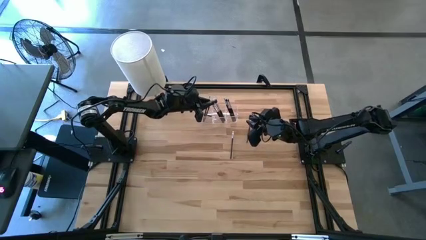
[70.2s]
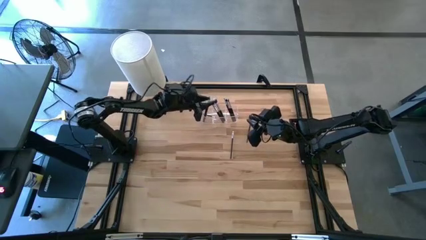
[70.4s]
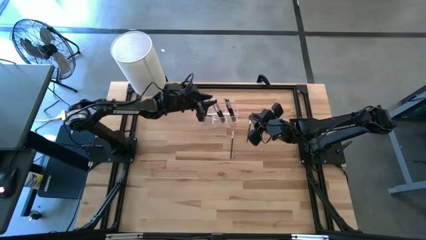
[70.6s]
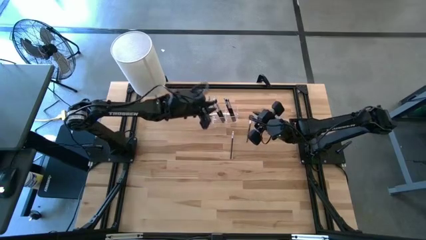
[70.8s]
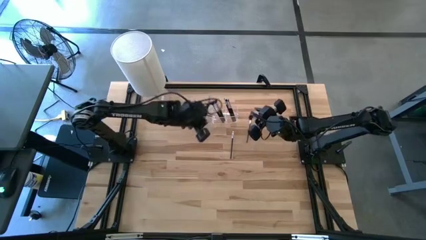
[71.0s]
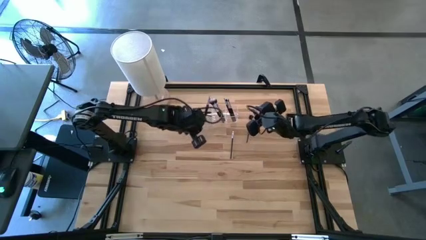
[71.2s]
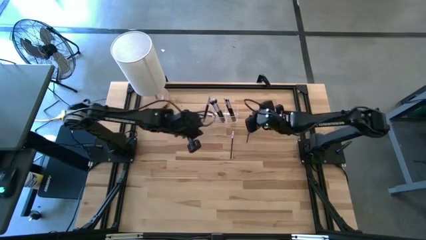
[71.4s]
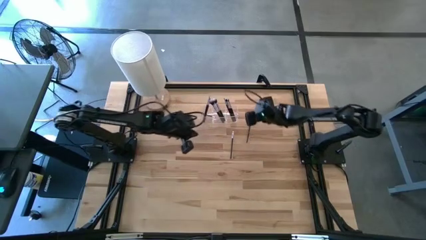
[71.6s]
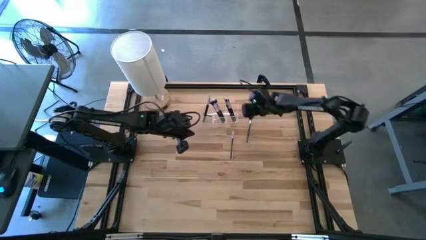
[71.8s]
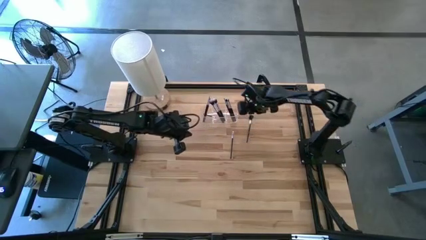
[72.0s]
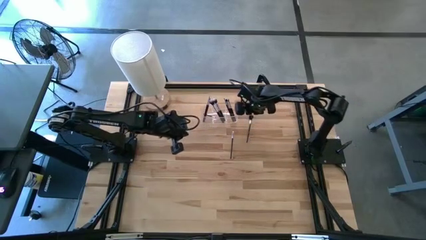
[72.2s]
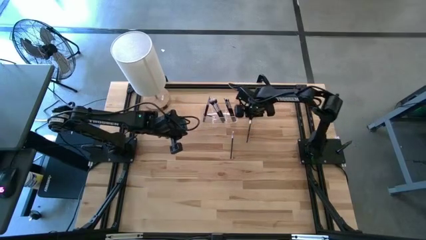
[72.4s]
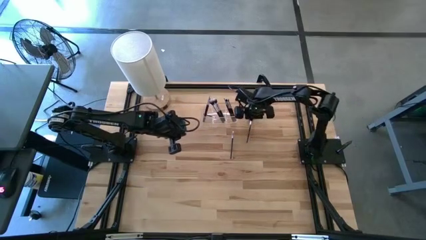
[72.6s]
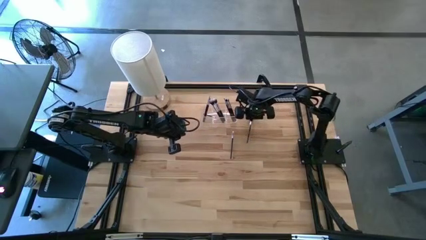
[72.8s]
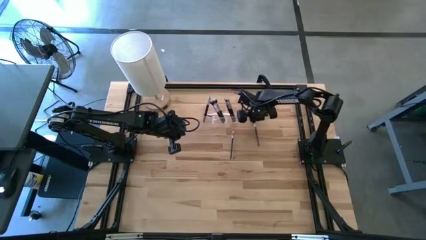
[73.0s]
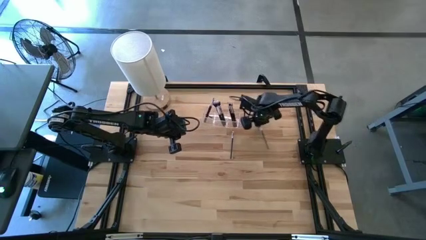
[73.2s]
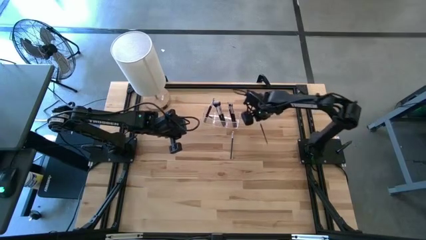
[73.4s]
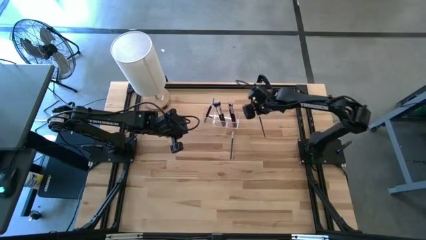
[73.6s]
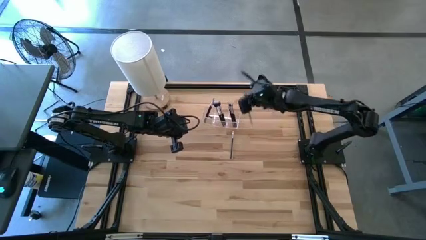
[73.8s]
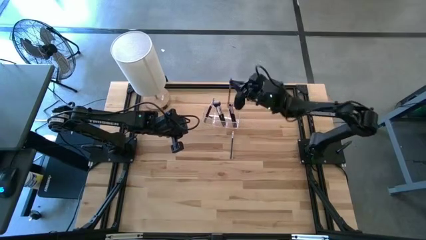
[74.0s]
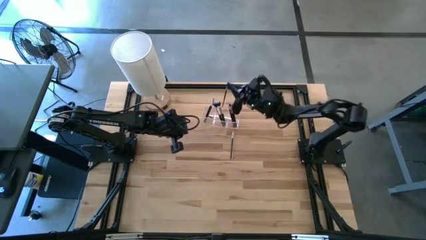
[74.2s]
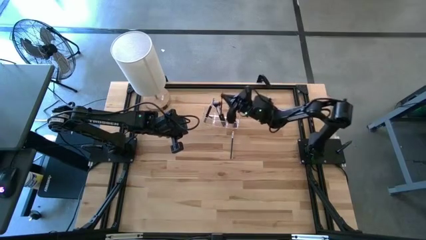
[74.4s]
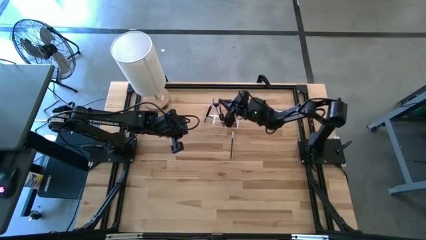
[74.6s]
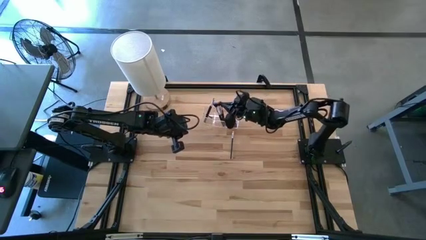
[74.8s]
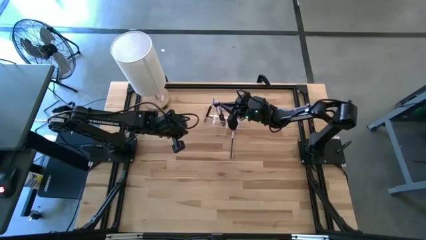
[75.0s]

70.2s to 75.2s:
Task: Put items in baskets/containers
Put the black eye groomer brush into the transparent organizer

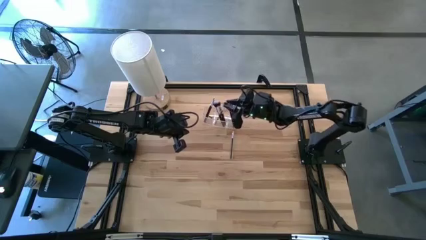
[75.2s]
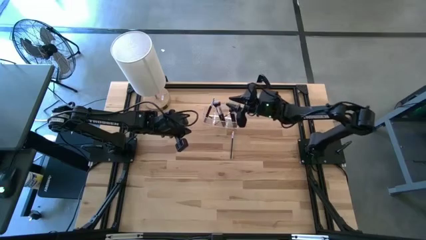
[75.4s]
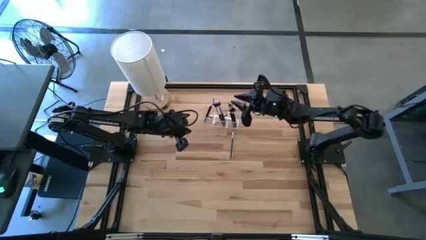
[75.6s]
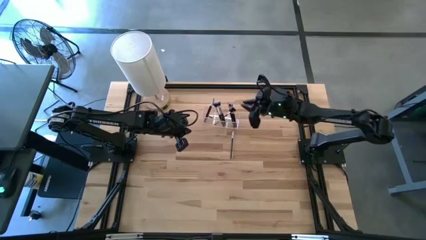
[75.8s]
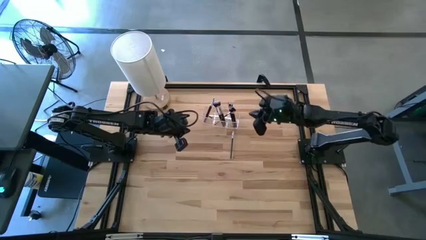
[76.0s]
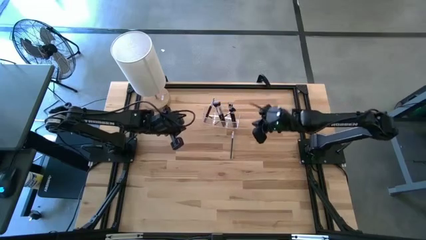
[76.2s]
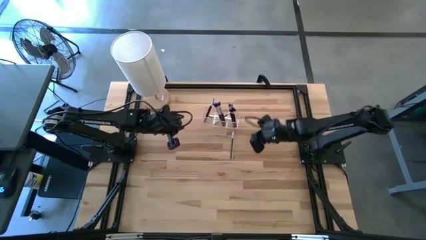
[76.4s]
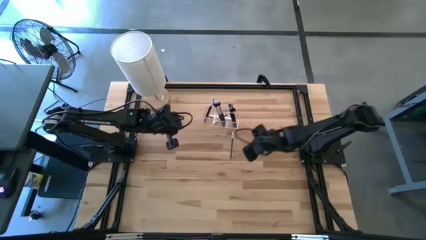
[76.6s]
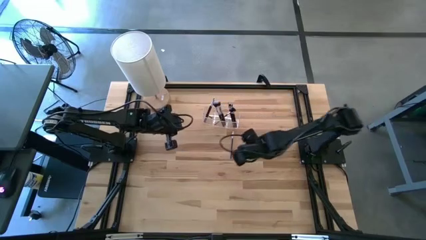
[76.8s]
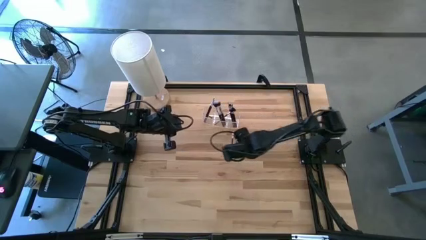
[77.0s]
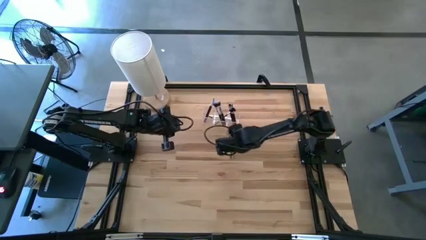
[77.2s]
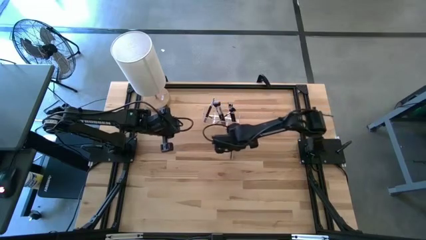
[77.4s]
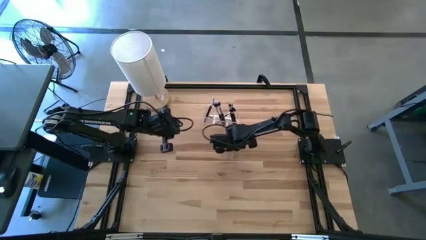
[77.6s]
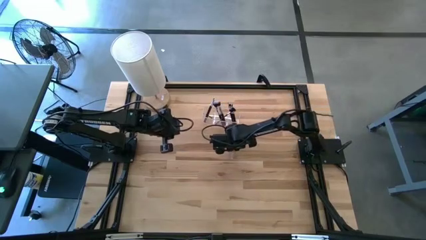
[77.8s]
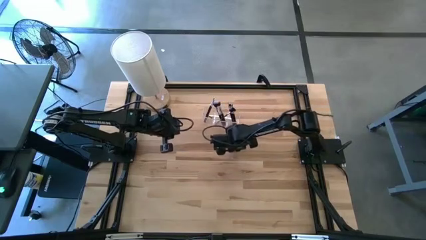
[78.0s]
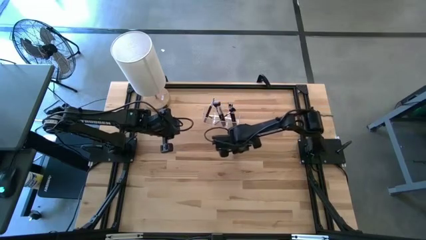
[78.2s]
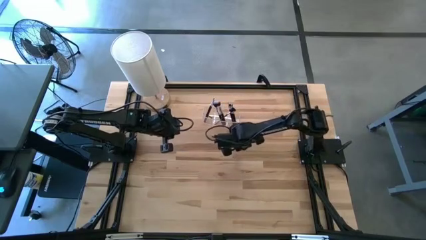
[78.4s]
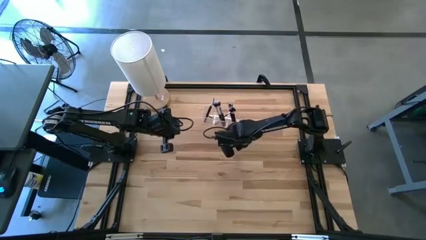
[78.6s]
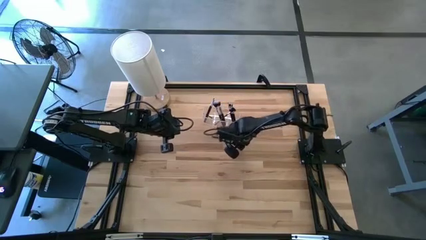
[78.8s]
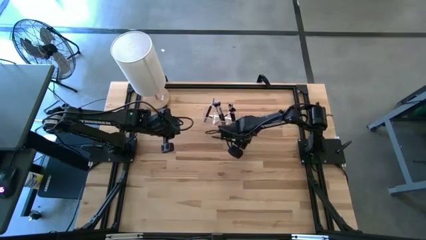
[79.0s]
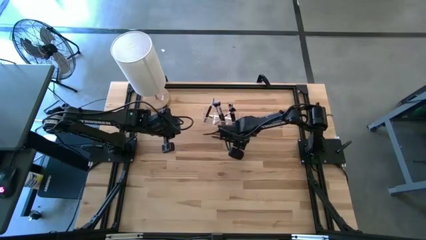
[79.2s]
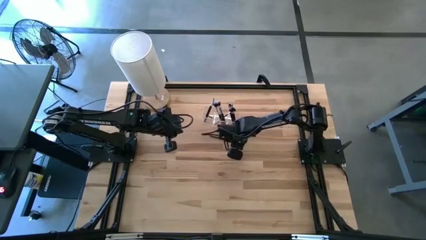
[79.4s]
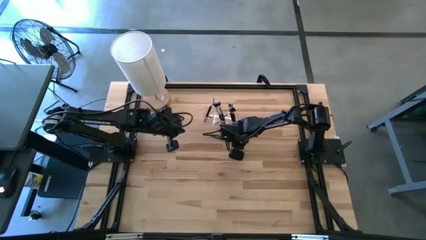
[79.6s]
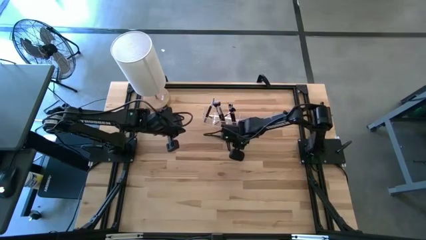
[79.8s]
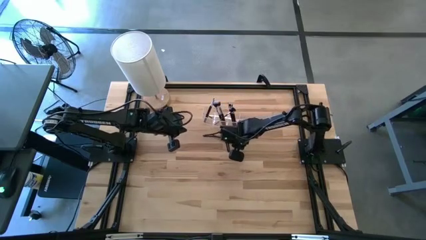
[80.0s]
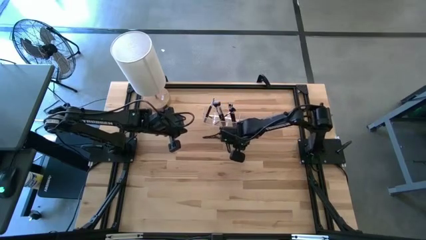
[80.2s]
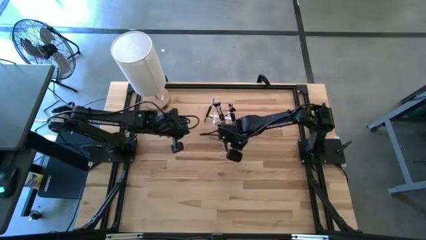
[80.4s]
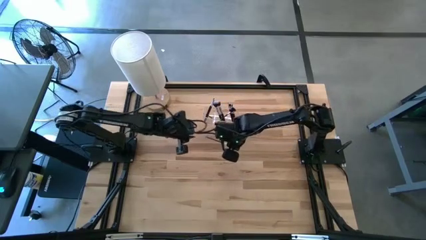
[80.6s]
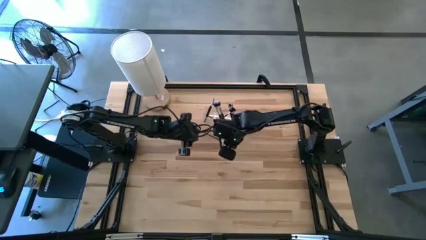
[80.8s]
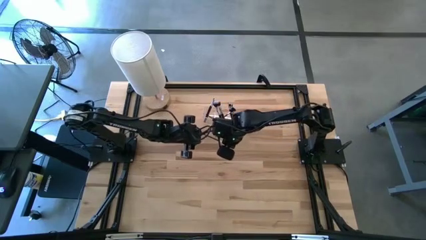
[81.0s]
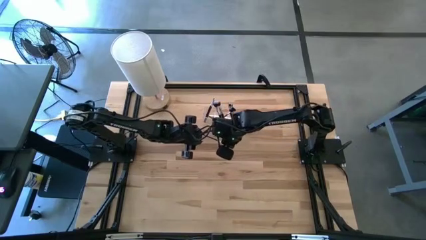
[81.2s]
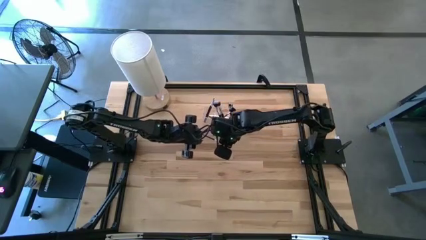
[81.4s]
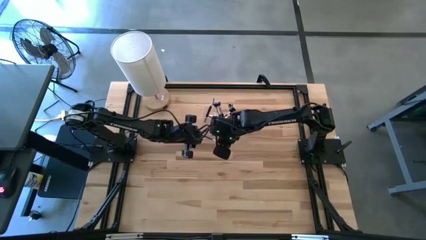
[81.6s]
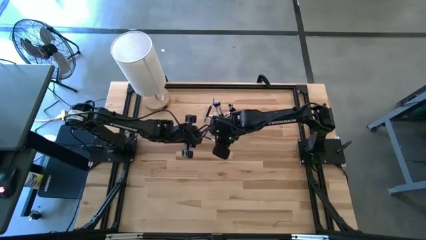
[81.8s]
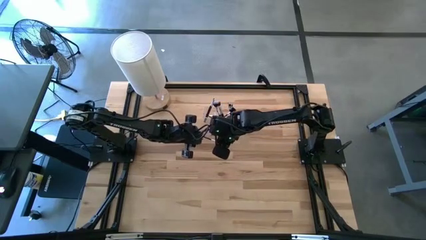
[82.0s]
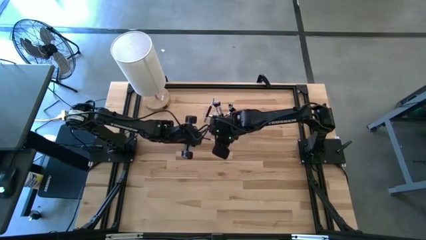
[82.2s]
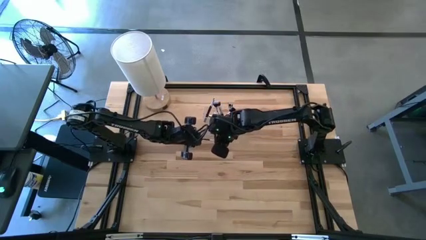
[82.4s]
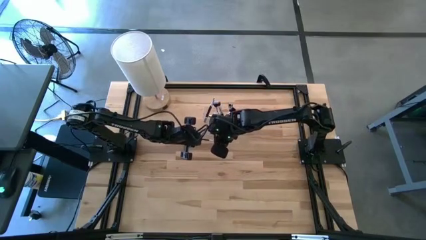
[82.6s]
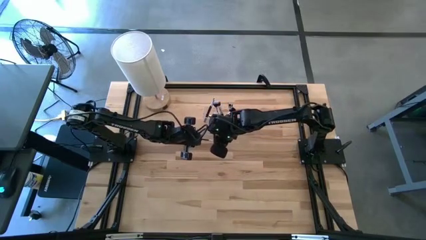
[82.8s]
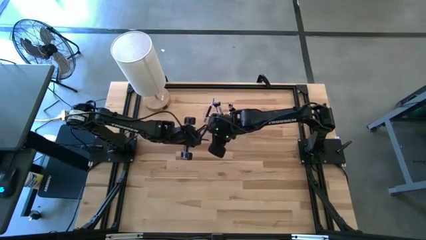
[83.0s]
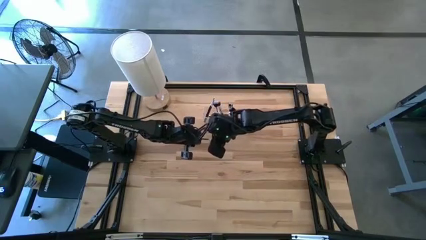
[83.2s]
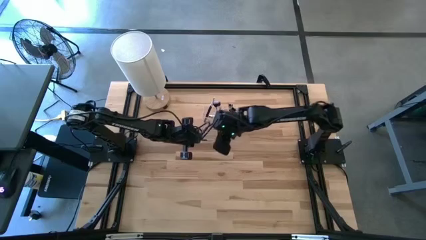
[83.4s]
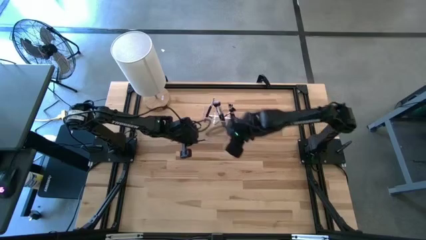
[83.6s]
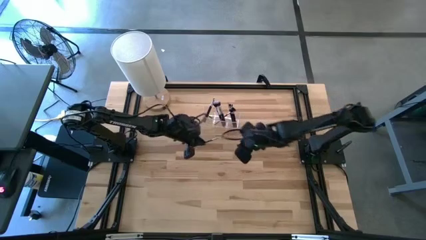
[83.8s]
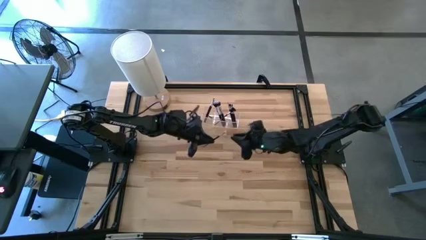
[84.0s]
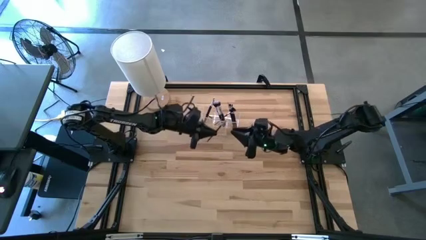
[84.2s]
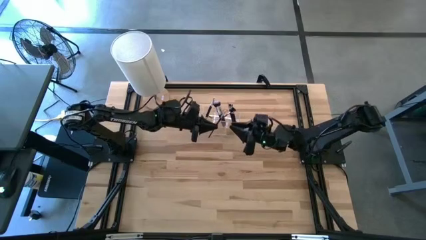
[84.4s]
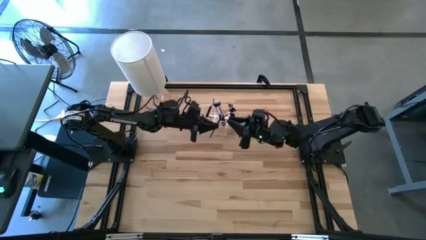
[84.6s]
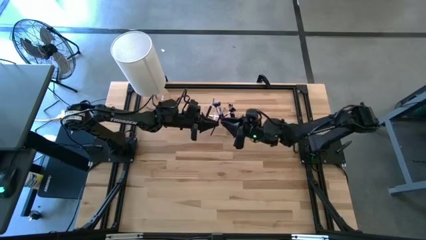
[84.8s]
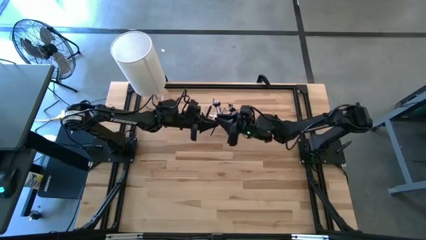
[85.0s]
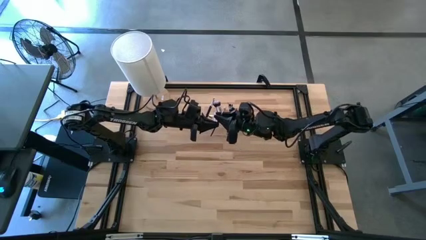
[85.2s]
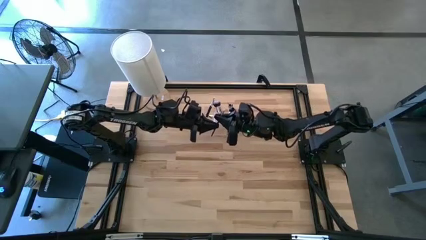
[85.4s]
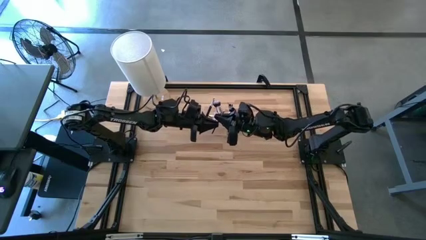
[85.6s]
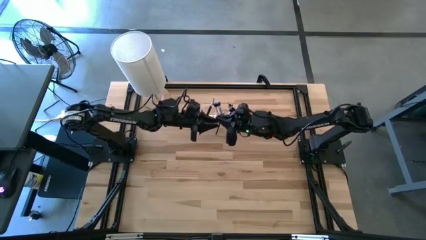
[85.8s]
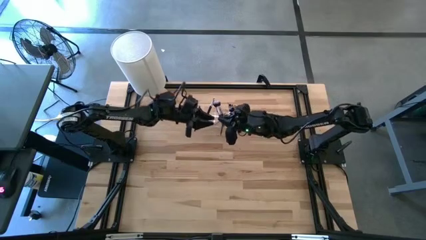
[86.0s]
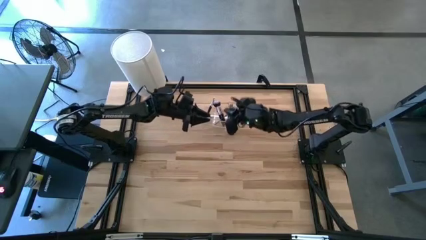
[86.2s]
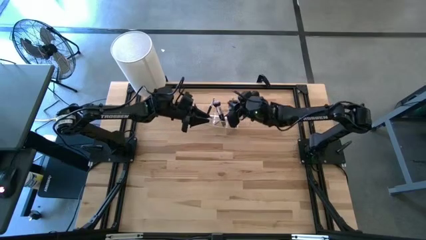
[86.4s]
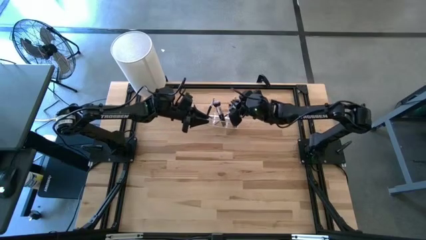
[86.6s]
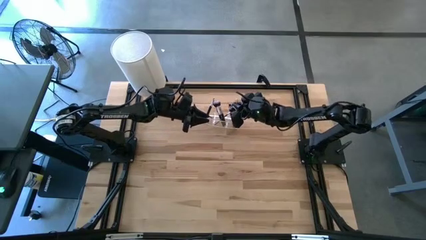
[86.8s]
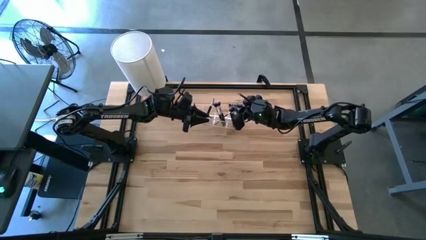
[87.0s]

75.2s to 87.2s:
Put the black eyeshadow brush into the transparent organizer
